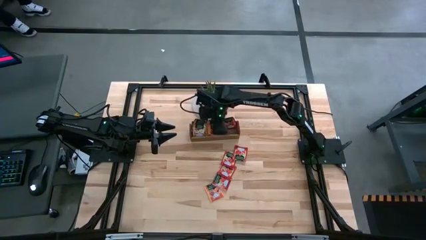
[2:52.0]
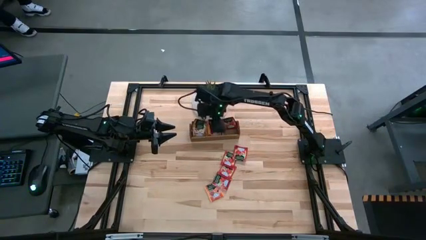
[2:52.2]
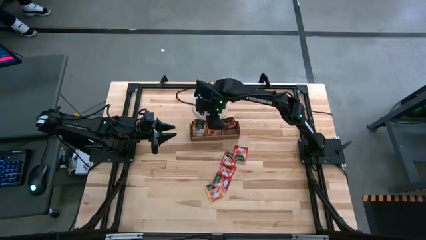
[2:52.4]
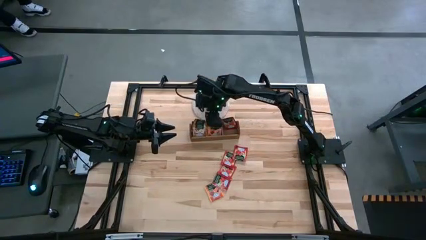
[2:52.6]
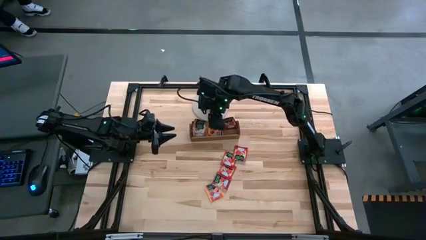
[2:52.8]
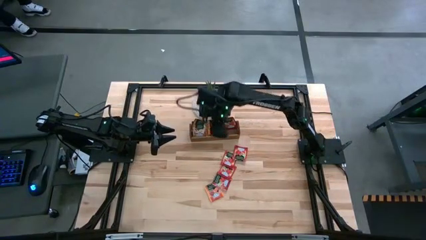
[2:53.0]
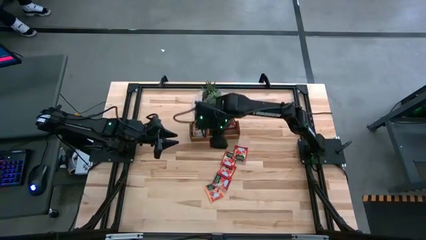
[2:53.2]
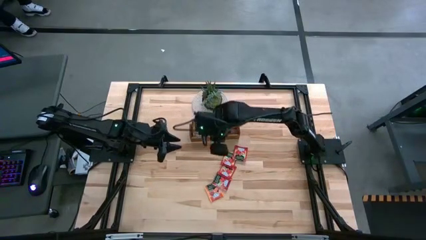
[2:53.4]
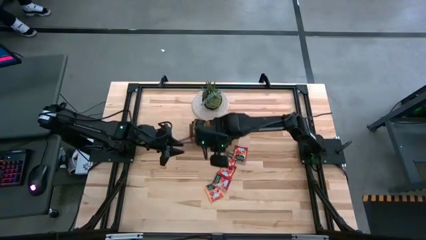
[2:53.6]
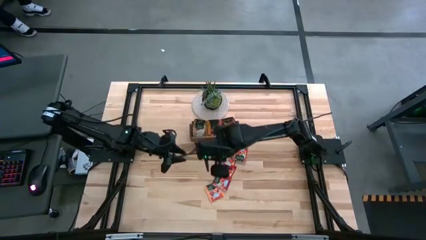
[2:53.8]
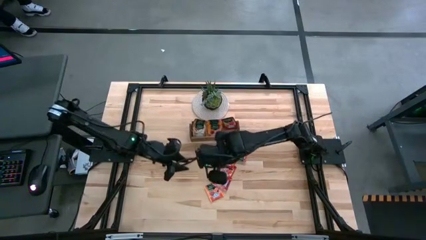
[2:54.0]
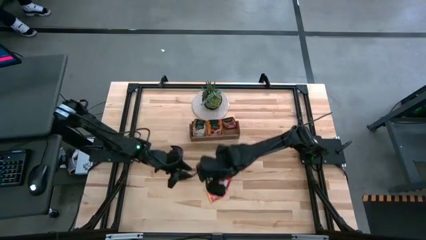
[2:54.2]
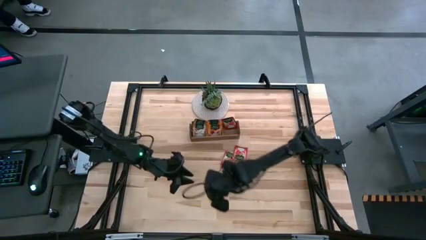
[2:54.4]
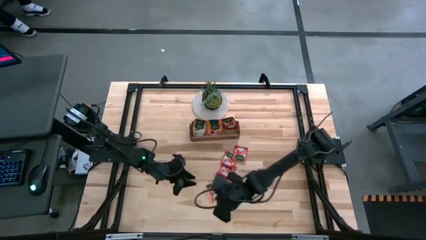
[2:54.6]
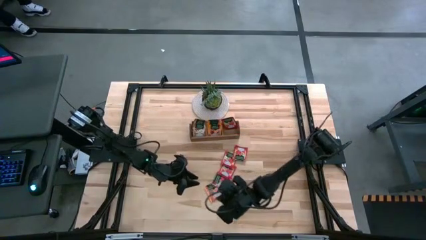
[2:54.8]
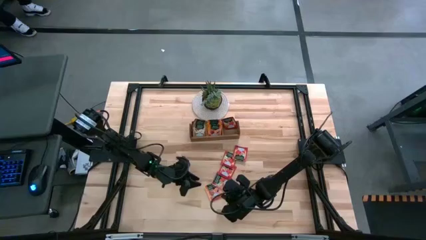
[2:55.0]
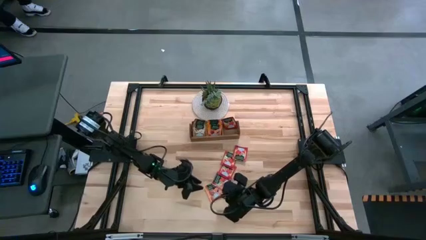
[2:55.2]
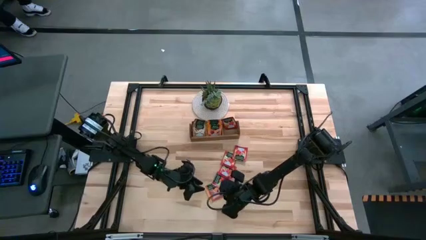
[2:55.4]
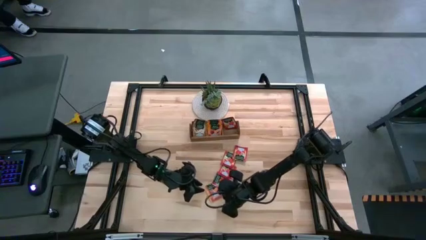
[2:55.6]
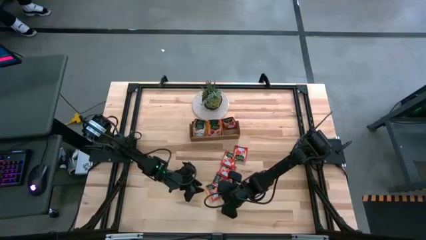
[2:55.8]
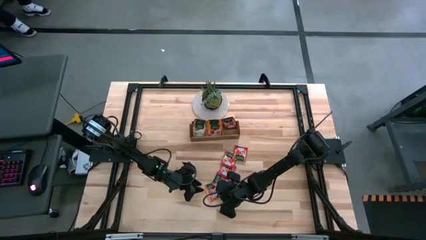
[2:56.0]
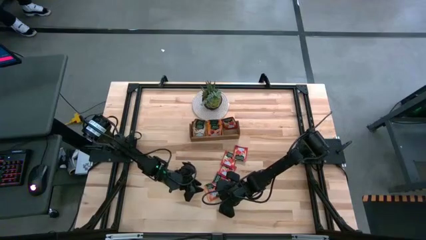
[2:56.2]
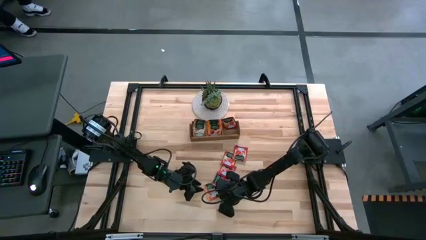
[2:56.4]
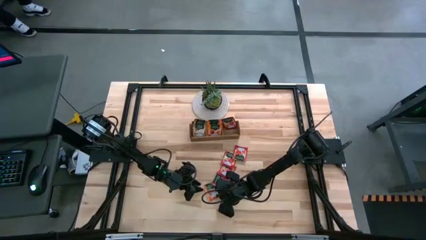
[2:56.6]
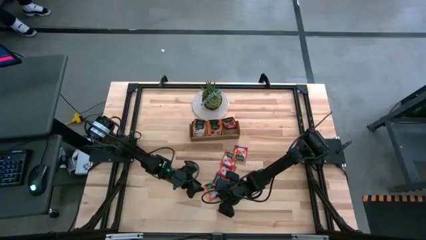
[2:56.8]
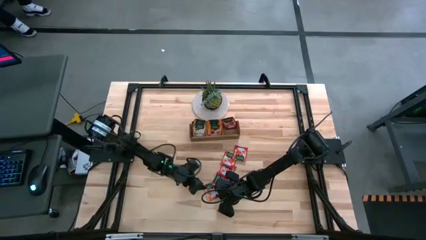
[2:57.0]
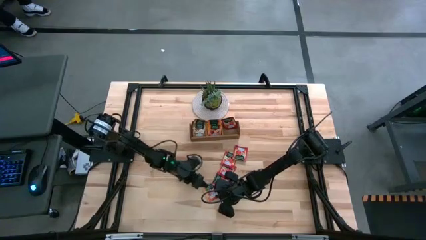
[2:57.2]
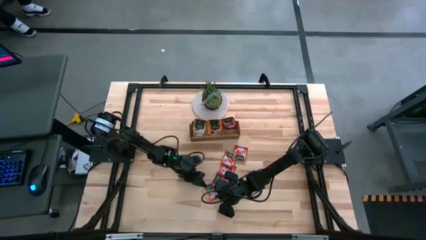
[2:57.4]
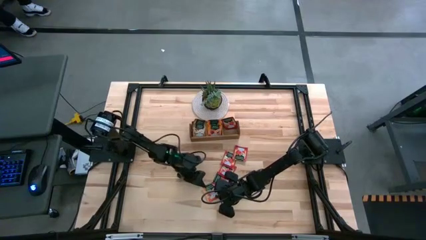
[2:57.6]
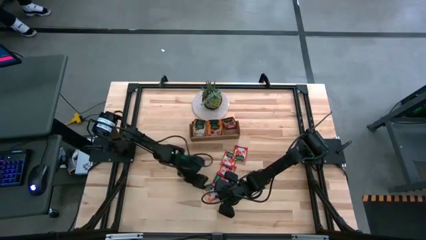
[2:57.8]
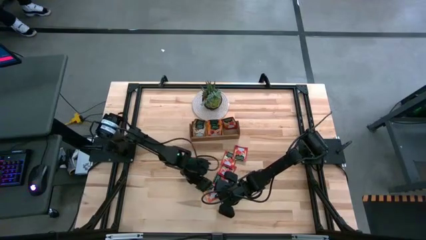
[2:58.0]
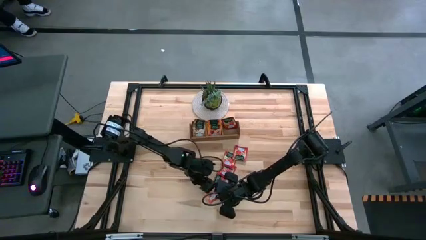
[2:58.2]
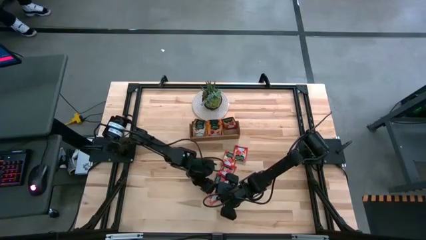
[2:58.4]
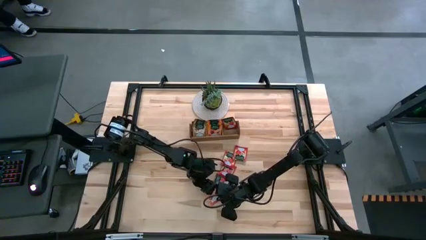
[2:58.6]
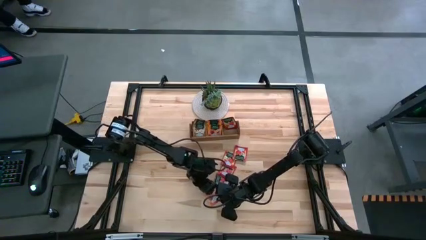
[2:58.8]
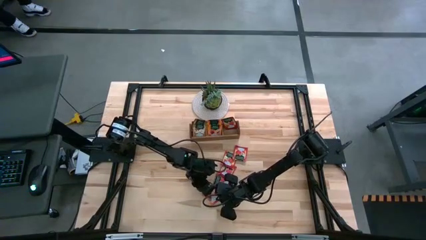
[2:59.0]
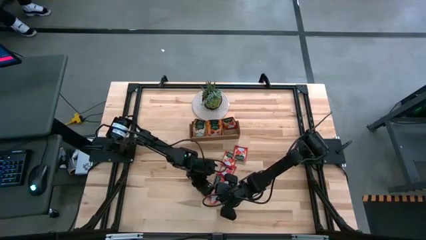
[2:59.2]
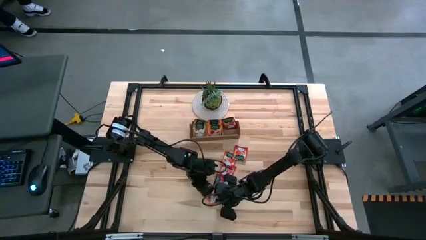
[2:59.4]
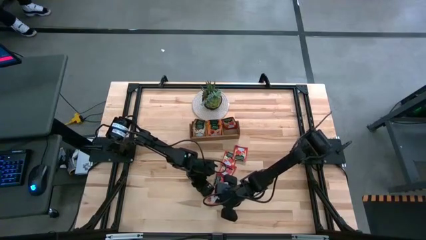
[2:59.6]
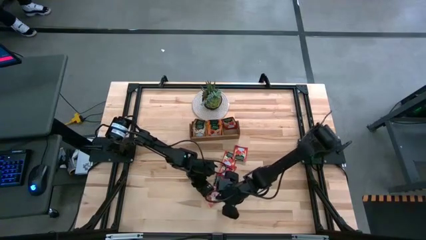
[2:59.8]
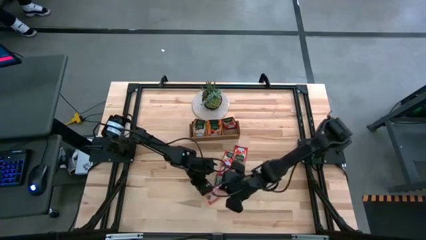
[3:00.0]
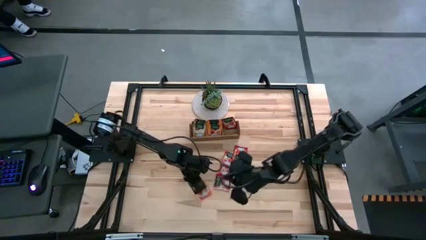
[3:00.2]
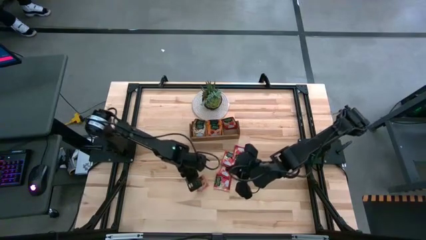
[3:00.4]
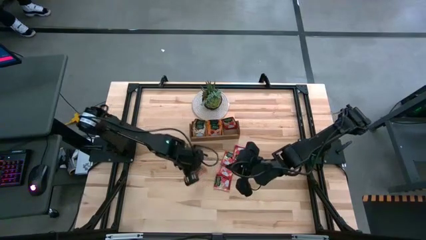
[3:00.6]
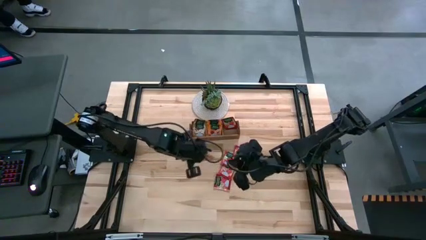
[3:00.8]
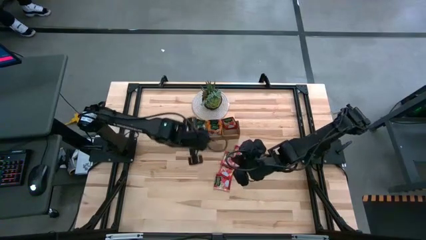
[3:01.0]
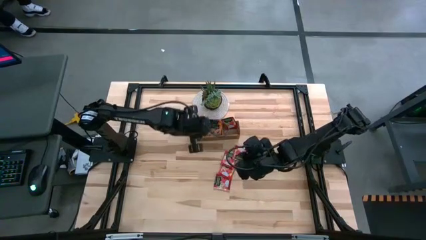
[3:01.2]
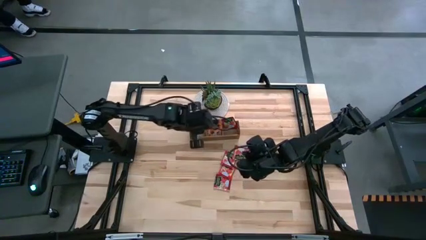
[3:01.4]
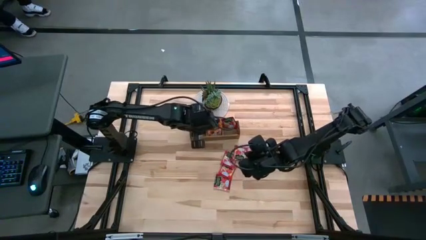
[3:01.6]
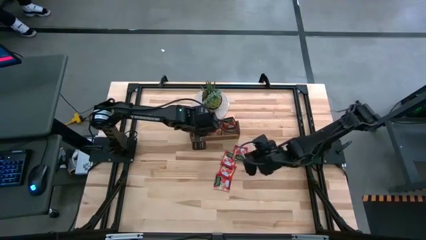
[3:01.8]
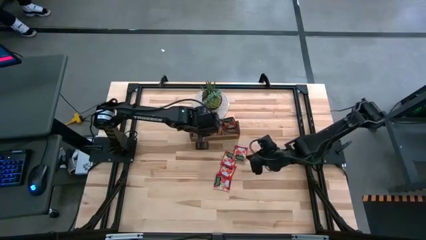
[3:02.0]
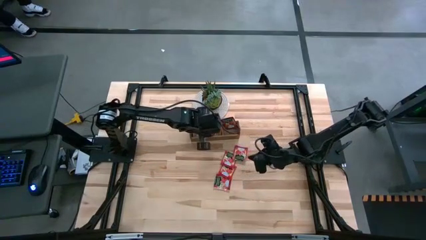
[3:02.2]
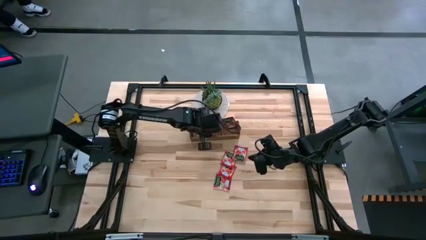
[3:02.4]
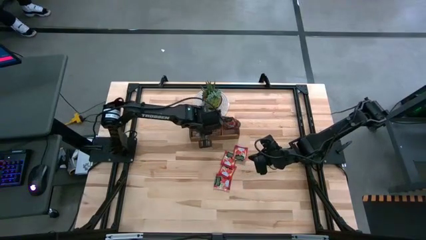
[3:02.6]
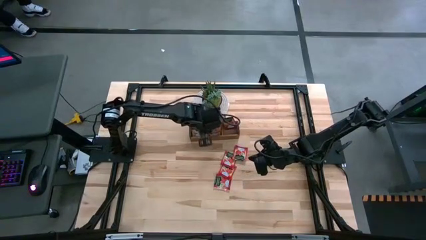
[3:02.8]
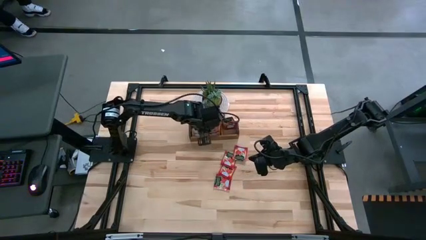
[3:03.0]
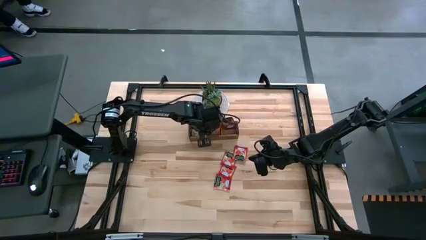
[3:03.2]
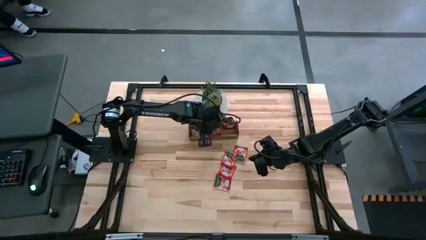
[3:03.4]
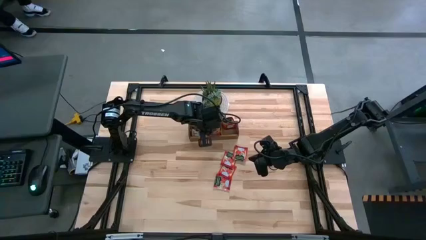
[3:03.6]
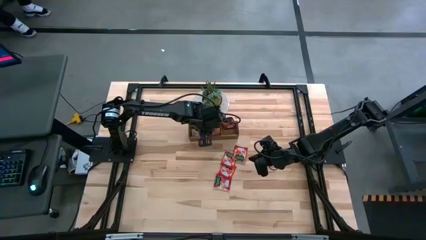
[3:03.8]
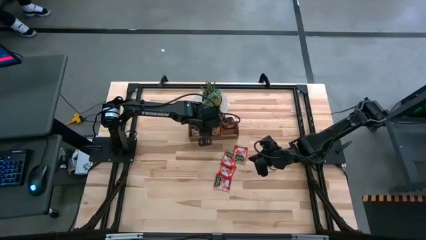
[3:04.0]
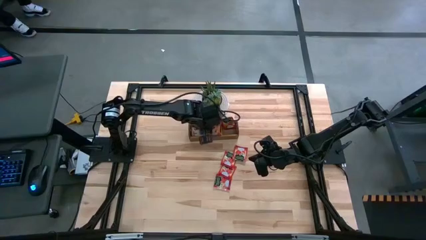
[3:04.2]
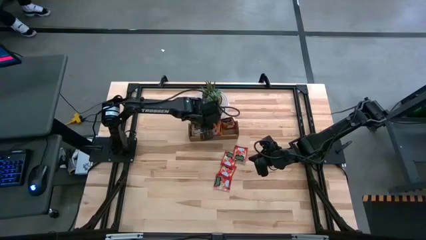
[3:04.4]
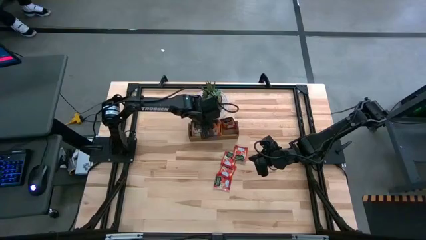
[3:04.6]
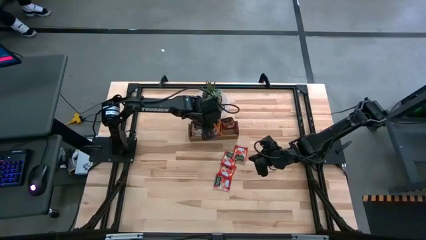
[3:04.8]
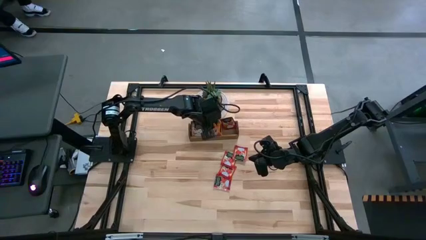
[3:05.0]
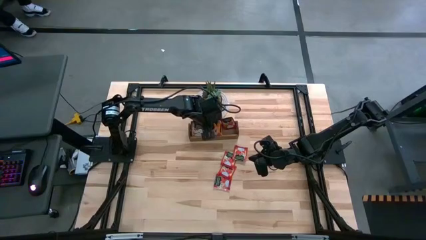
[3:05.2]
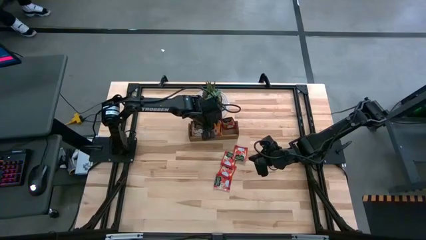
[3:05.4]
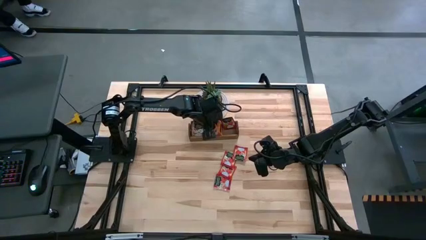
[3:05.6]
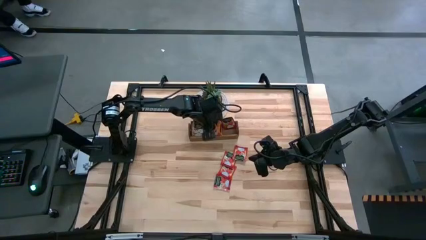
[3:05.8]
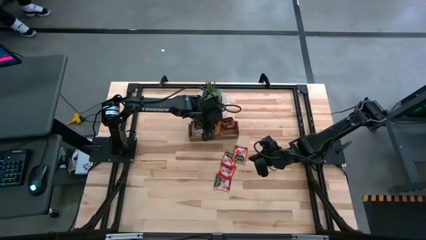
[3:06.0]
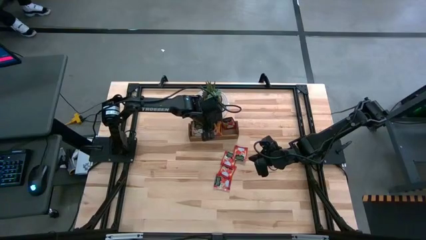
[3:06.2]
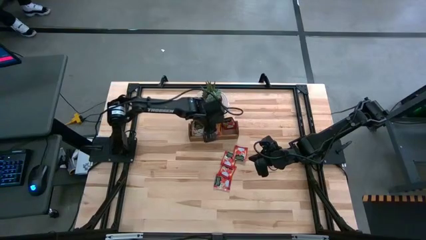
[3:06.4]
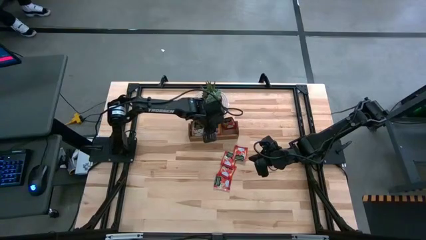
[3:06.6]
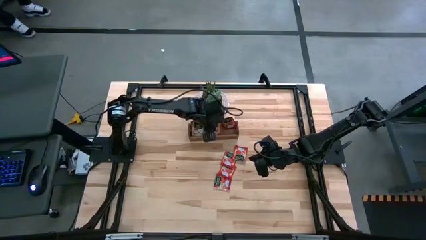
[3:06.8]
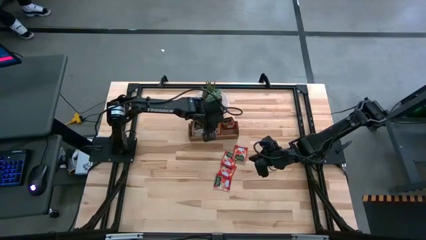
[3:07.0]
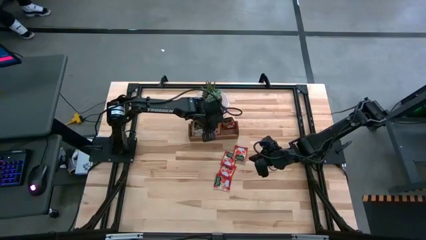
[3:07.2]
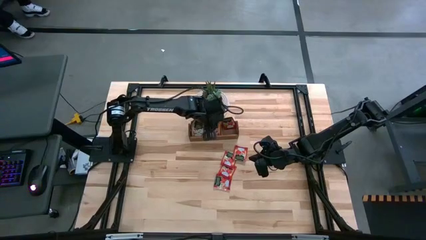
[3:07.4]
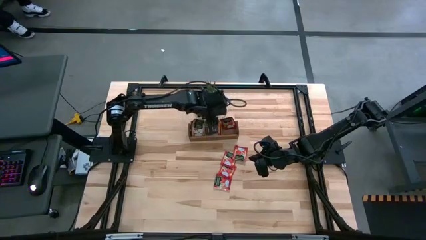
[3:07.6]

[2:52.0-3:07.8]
Task: Pick & Place Tea
Put the orange tea bag into the middle section of the wooden organizer
